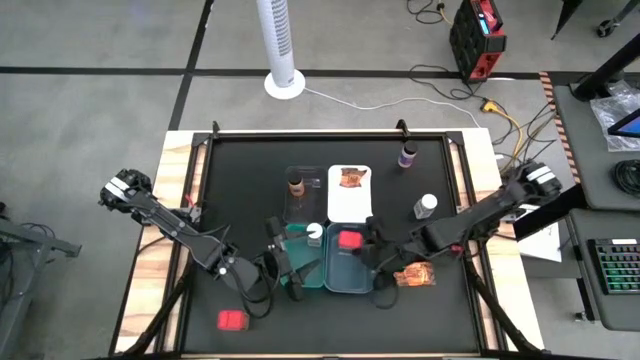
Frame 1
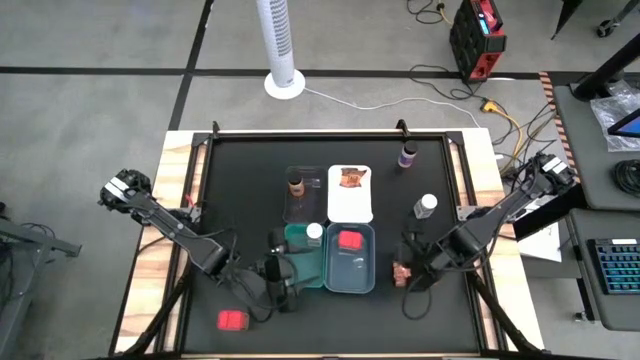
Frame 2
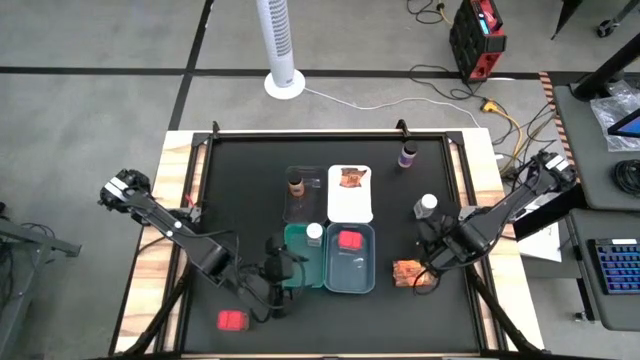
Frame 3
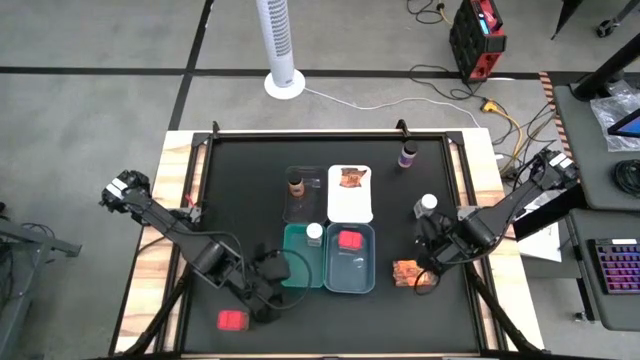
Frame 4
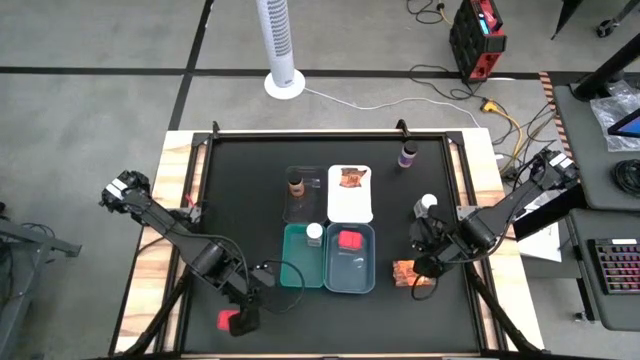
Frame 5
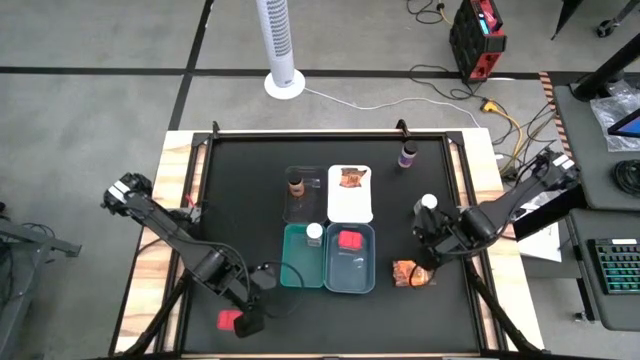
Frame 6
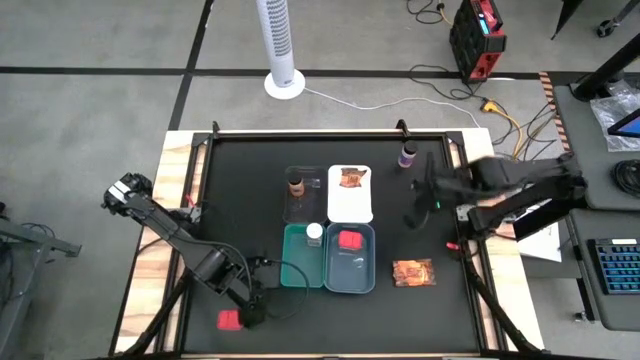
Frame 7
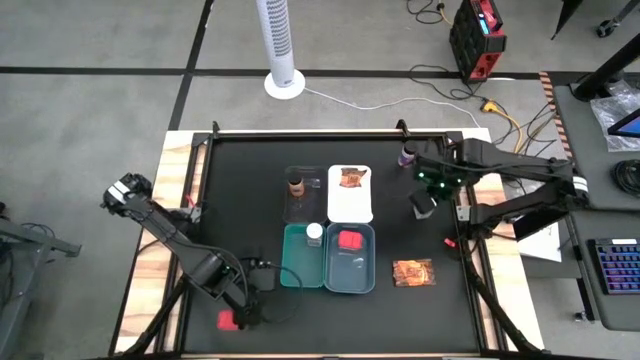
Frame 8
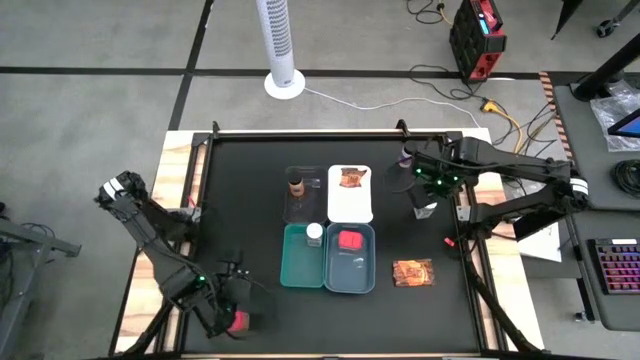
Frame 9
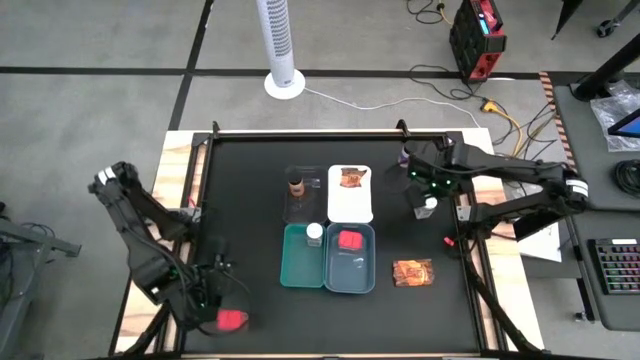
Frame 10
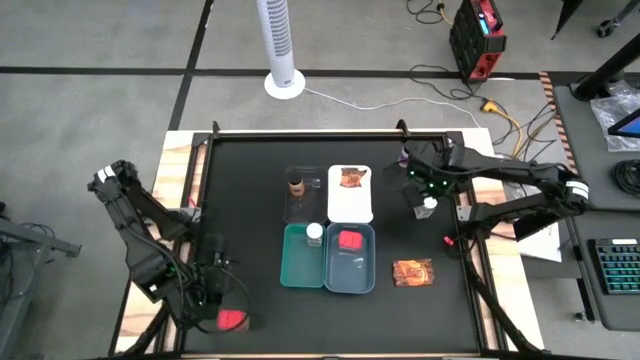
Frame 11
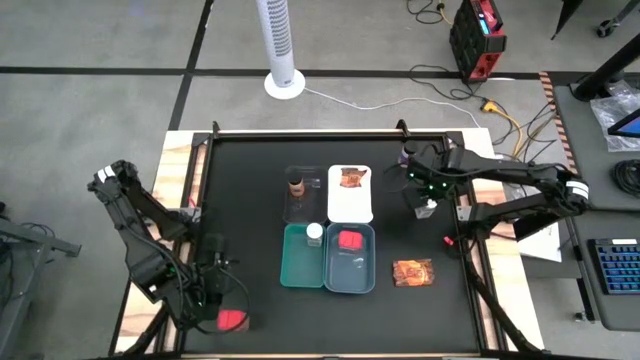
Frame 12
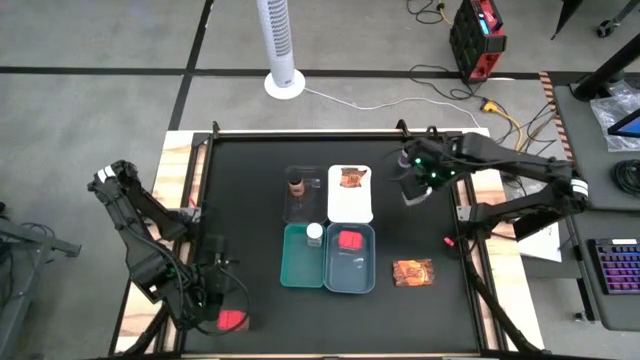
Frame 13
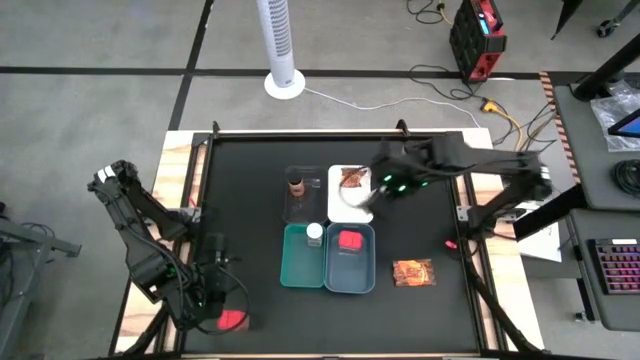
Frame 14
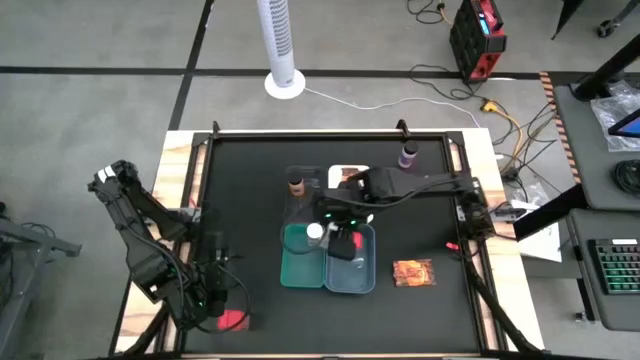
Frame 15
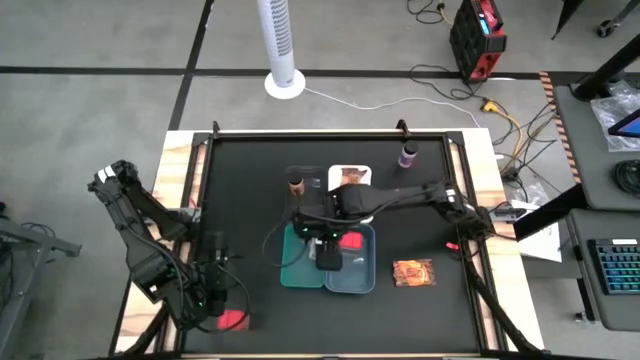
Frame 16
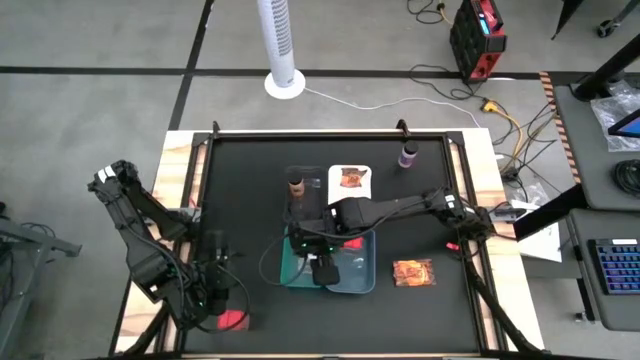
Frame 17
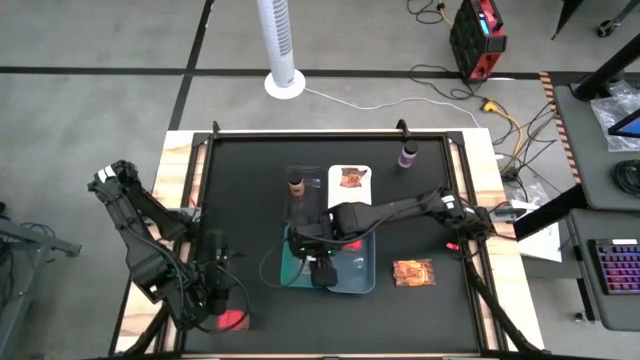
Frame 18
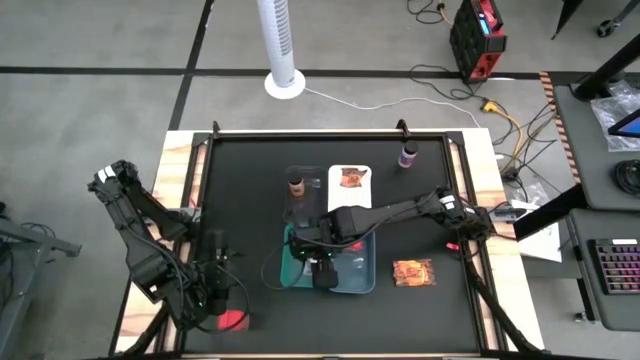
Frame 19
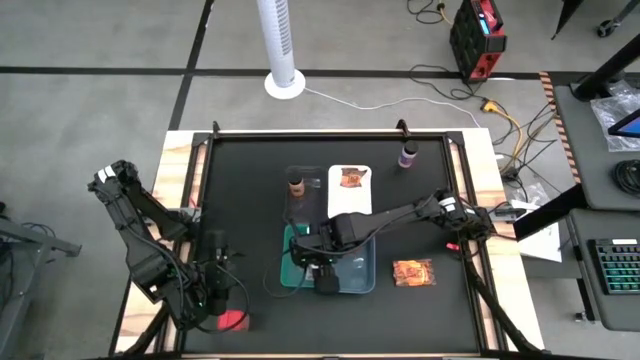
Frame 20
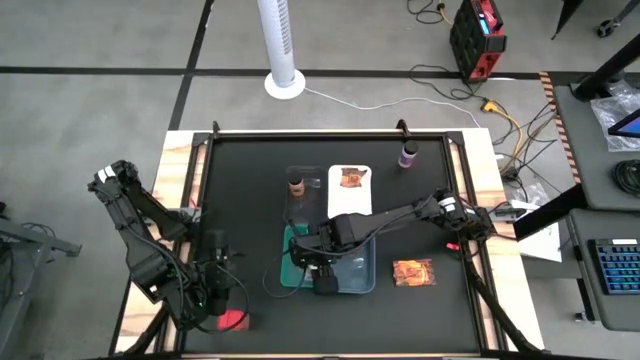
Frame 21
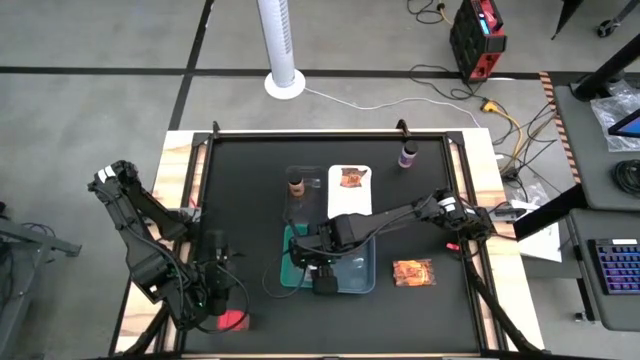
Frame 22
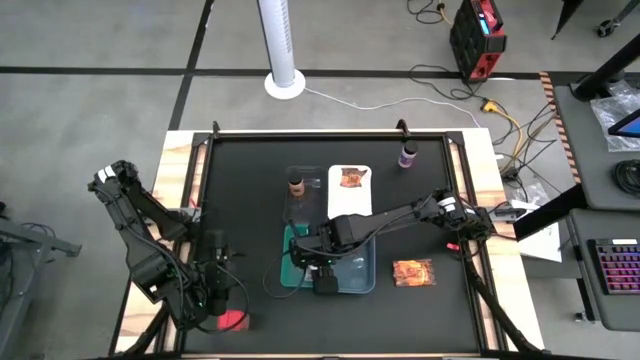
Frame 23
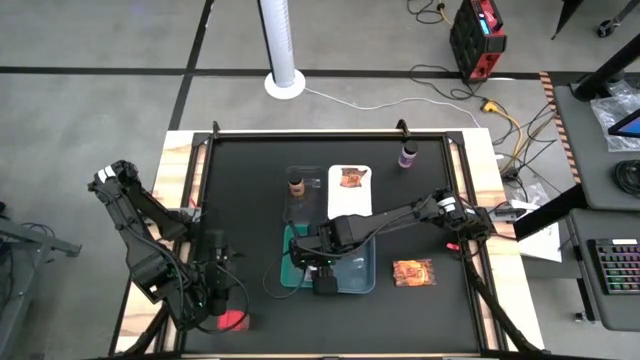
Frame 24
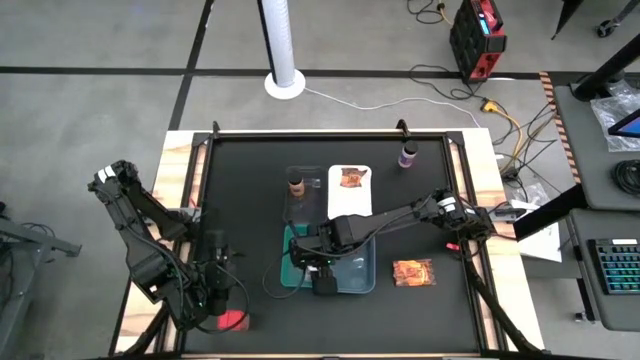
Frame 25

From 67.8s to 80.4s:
Task: Sort spices by type
Put the white seasoning bottle into the white bin

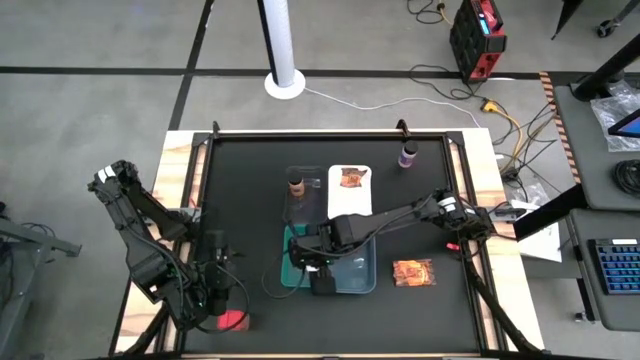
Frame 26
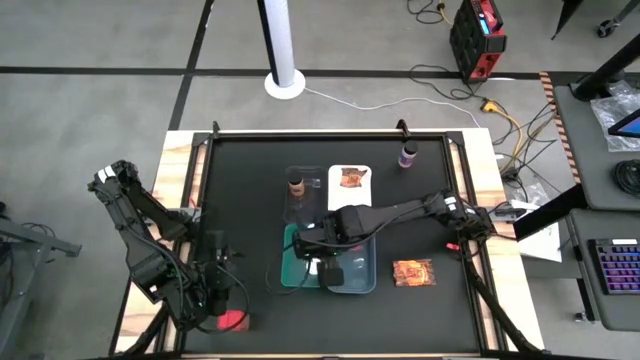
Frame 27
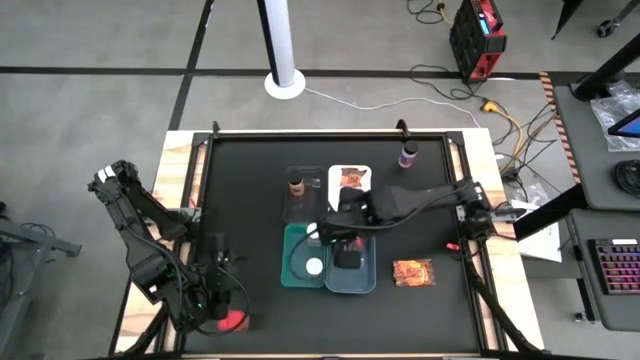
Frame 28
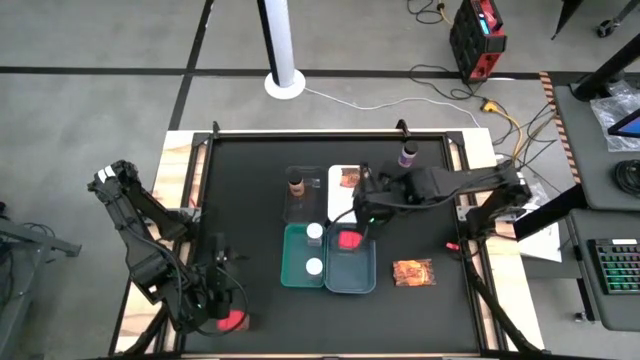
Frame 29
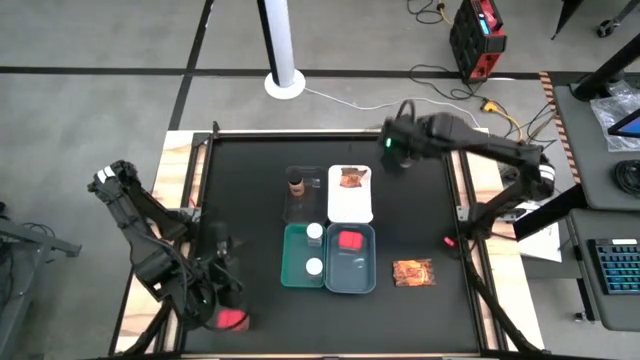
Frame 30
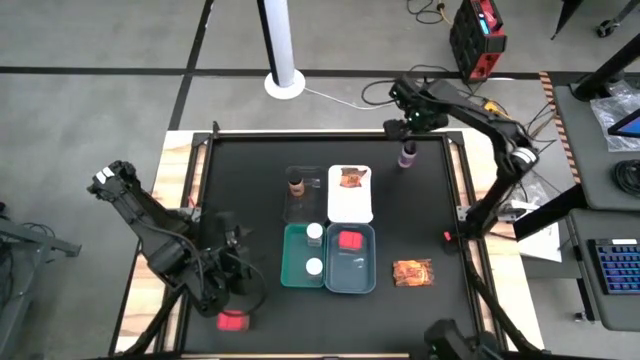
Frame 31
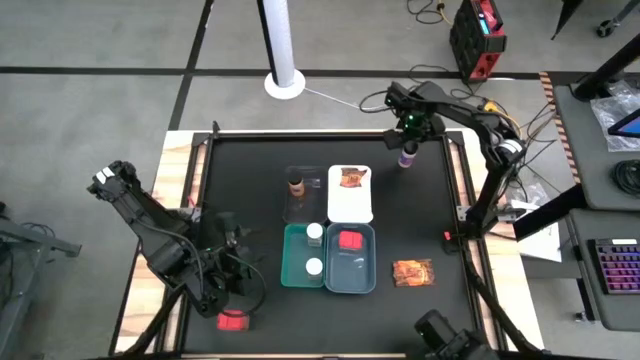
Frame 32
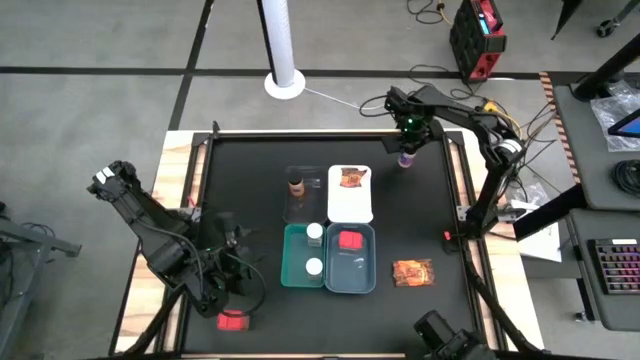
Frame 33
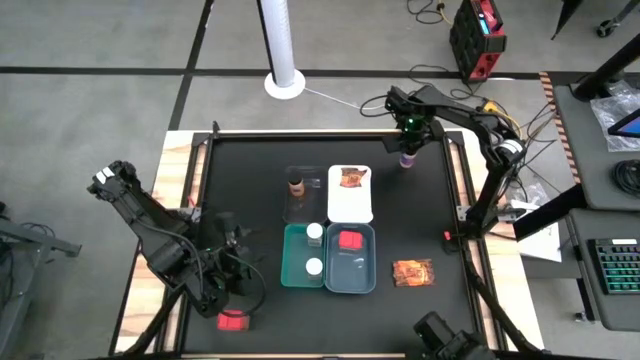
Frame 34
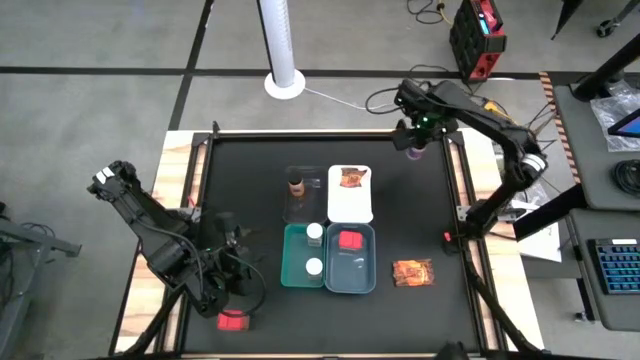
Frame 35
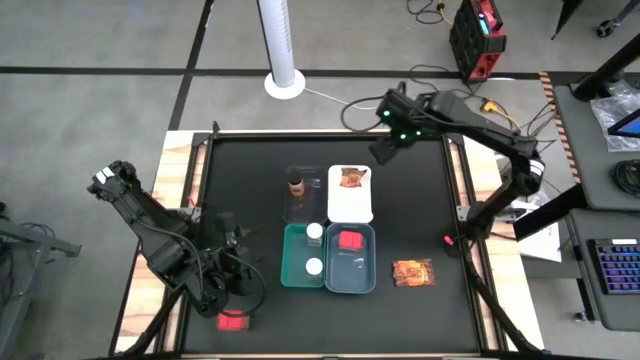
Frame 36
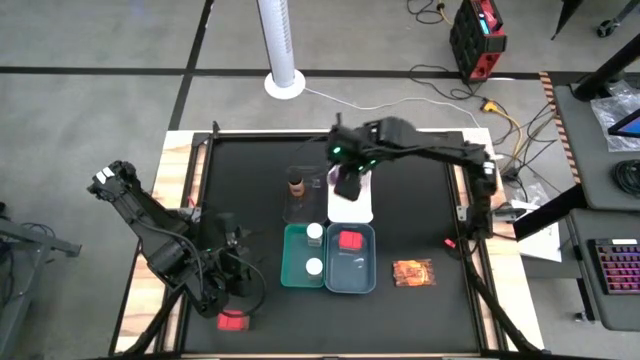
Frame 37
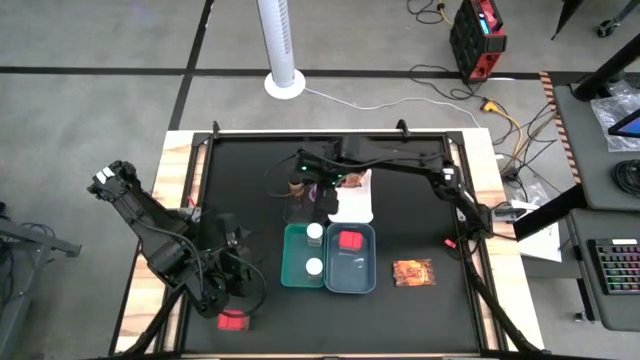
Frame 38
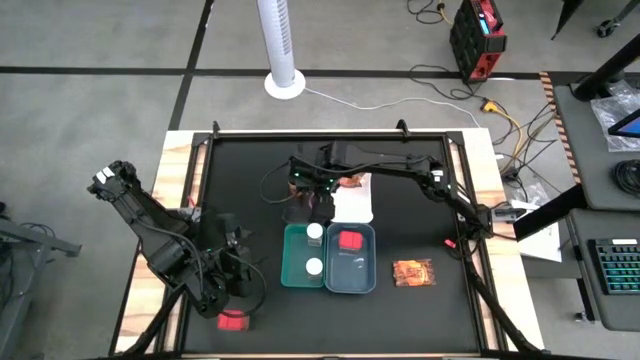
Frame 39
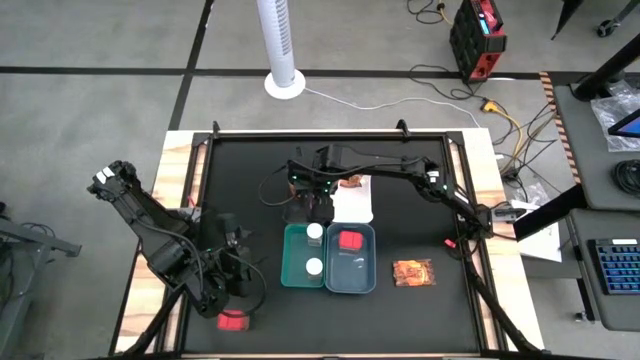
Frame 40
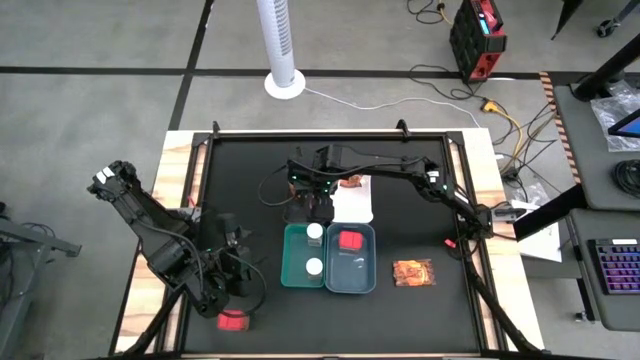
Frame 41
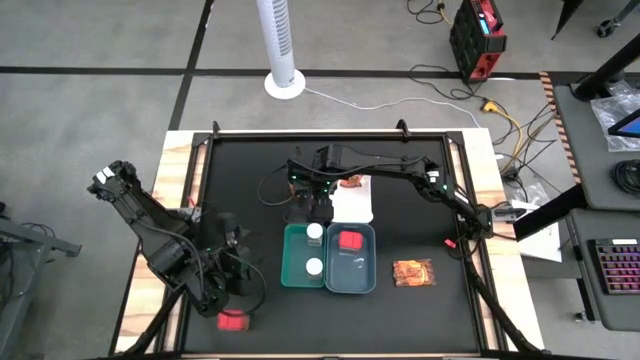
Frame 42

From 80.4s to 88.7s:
Put the black seasoning bottle into the black bin
